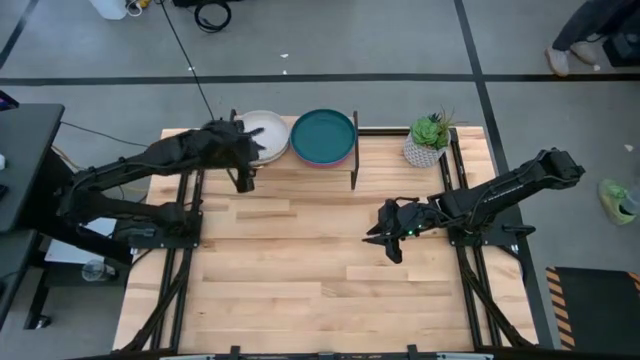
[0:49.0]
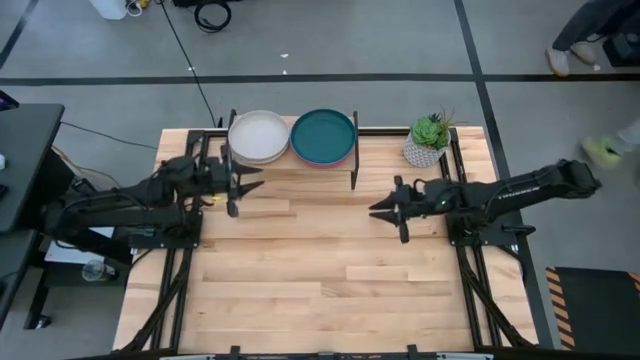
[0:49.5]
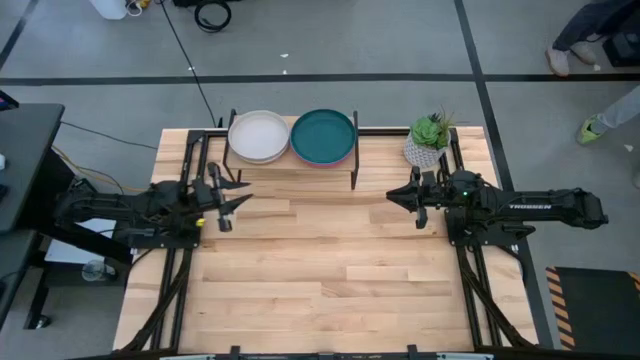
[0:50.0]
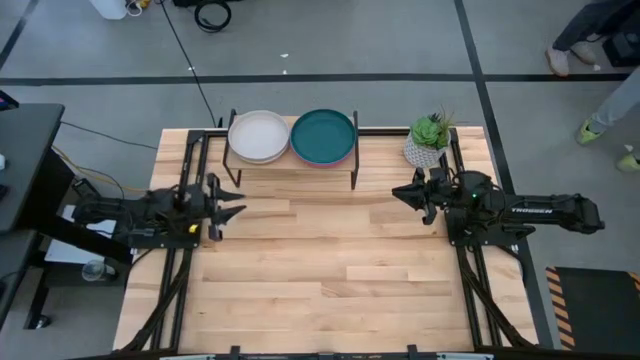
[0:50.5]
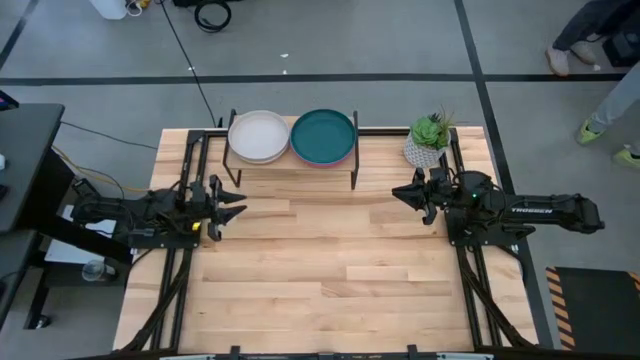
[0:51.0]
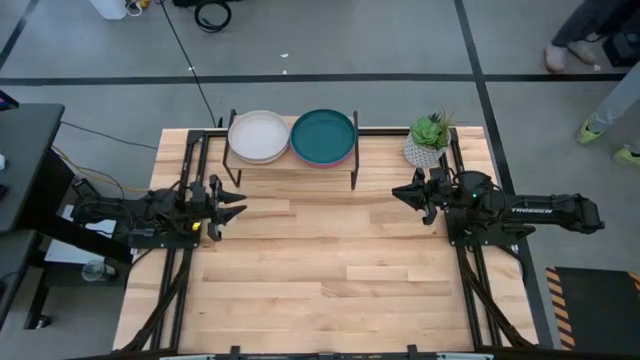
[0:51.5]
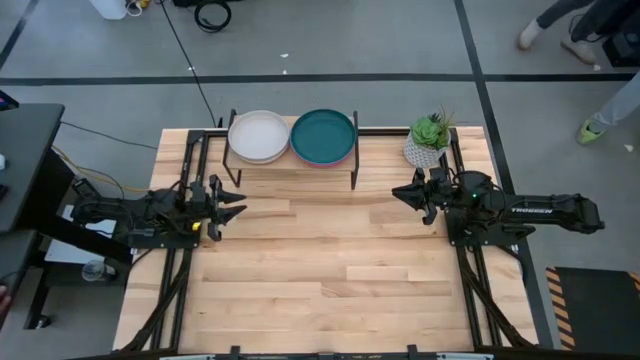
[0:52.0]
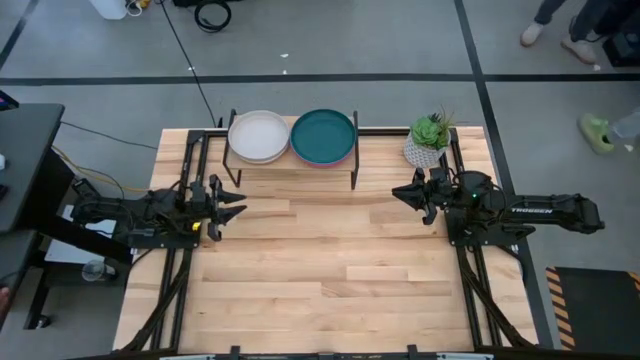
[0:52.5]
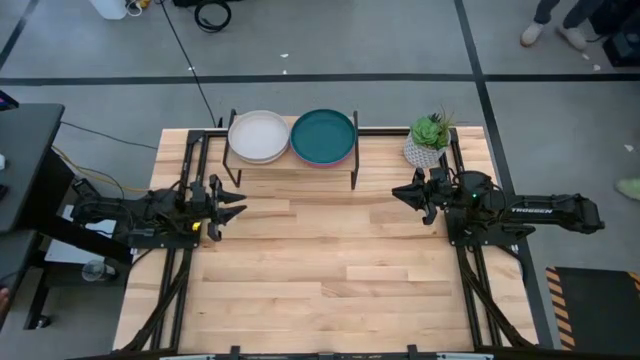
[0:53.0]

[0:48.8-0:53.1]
Task: Place and stack plates onto a shelf
Return to Home Position

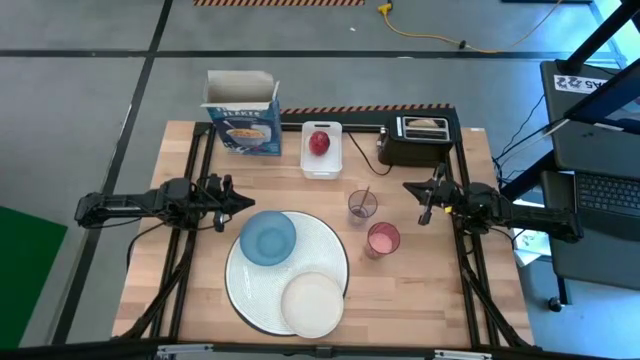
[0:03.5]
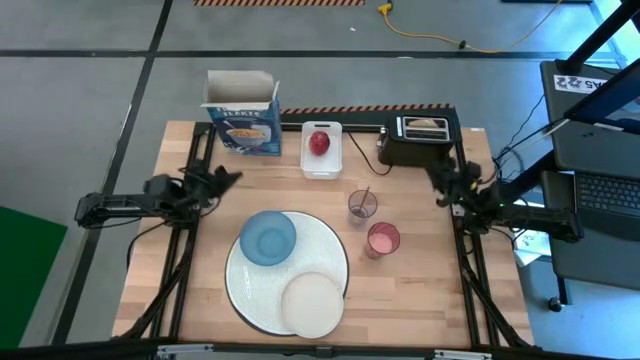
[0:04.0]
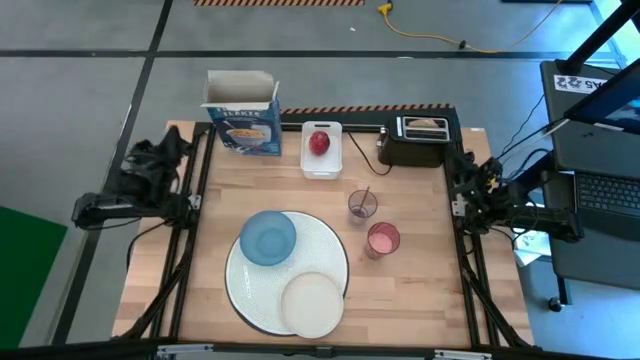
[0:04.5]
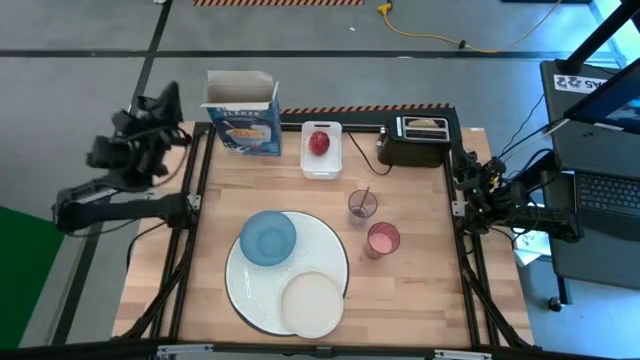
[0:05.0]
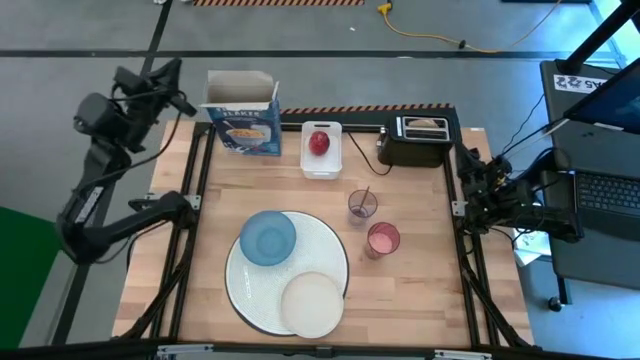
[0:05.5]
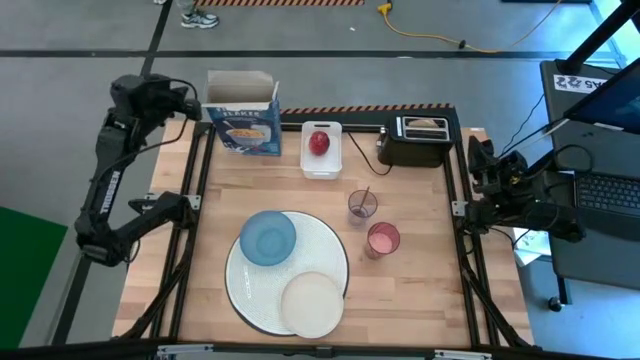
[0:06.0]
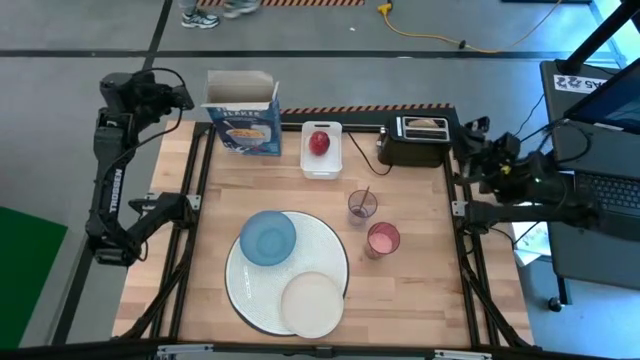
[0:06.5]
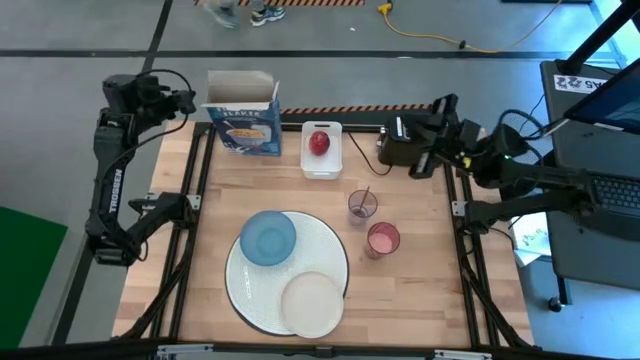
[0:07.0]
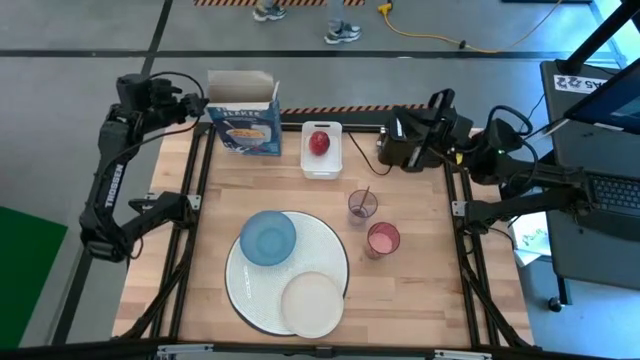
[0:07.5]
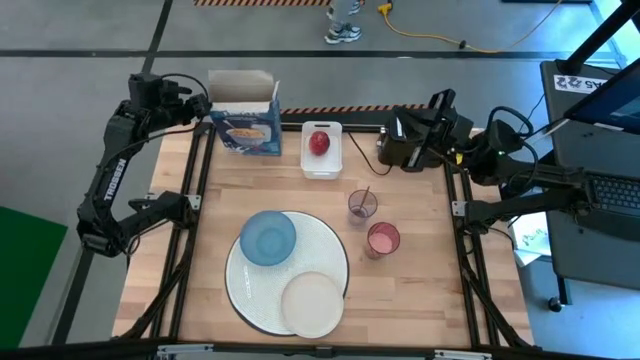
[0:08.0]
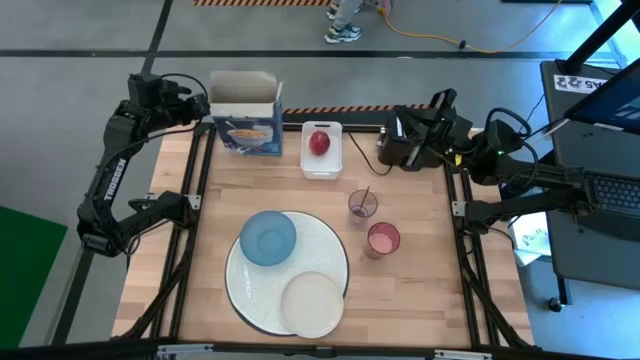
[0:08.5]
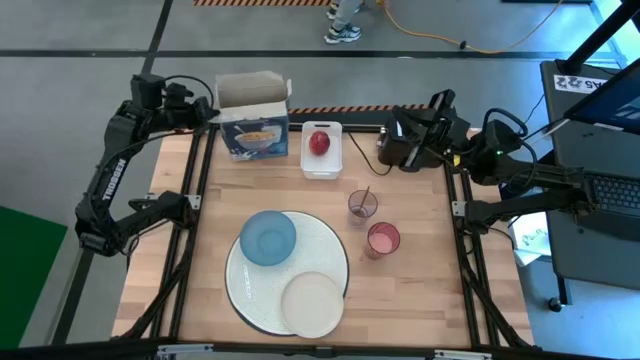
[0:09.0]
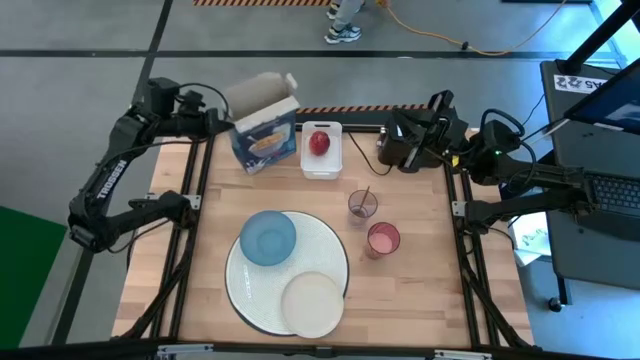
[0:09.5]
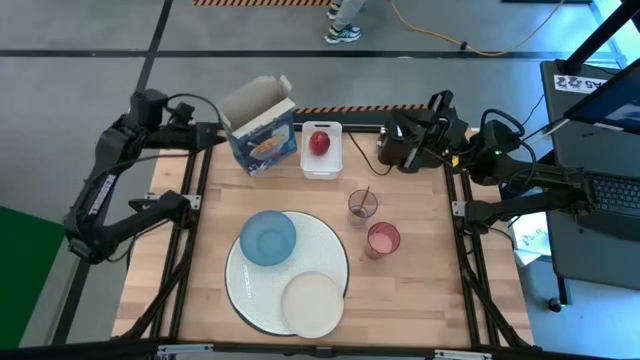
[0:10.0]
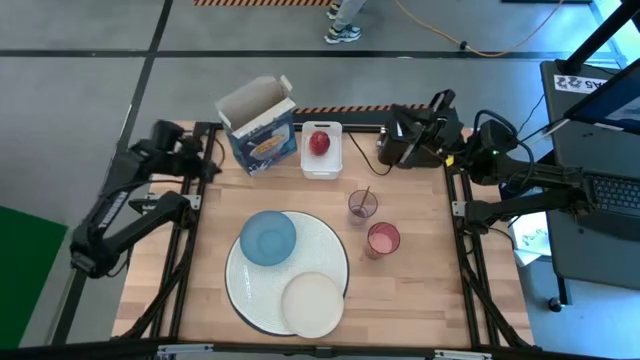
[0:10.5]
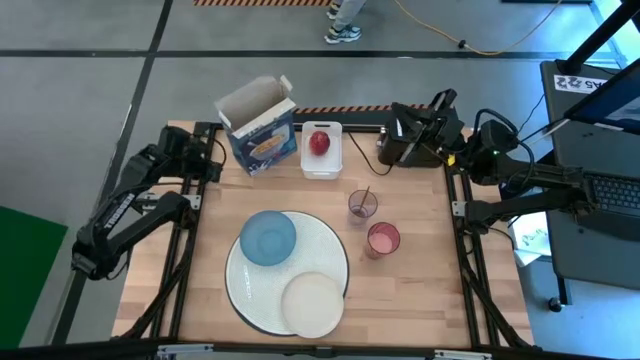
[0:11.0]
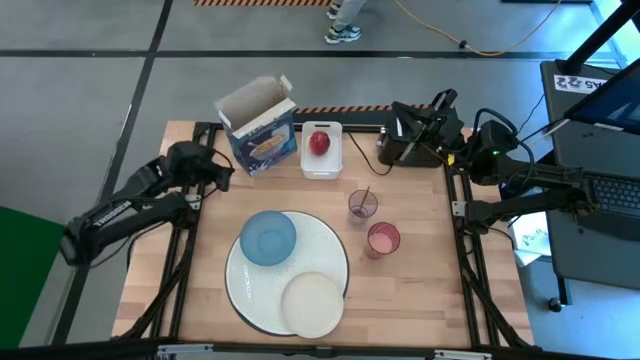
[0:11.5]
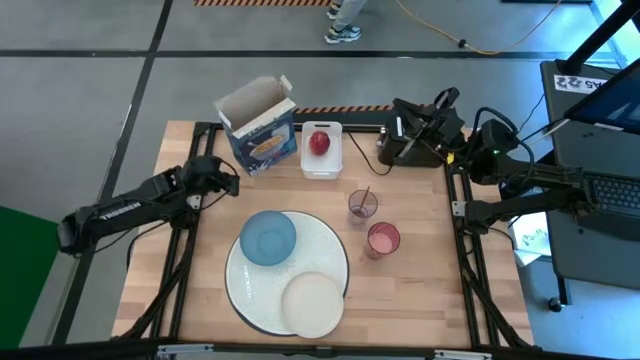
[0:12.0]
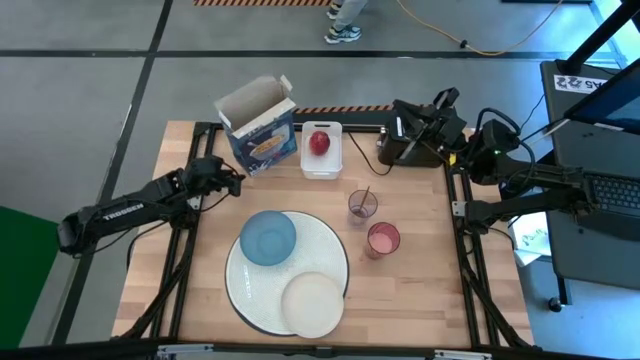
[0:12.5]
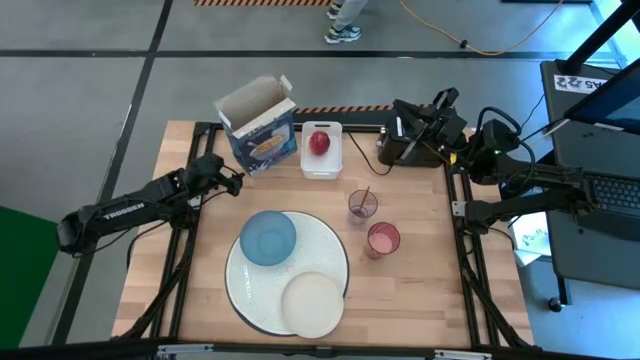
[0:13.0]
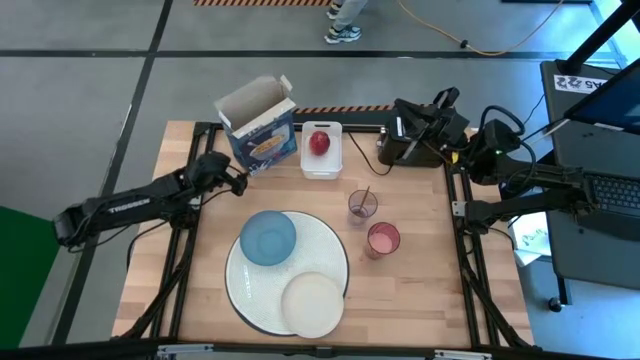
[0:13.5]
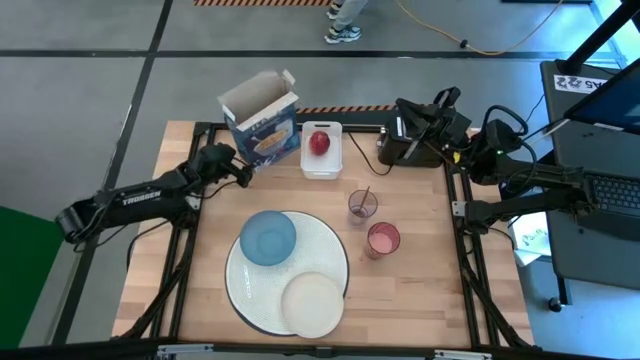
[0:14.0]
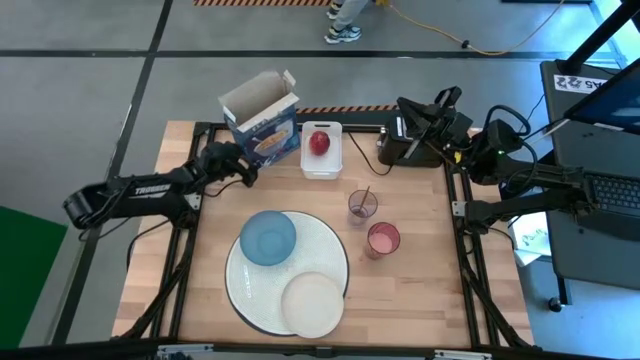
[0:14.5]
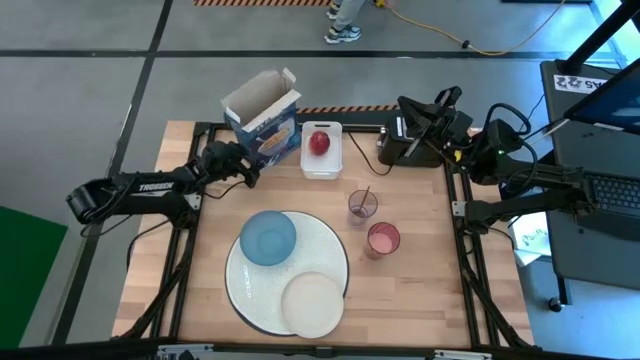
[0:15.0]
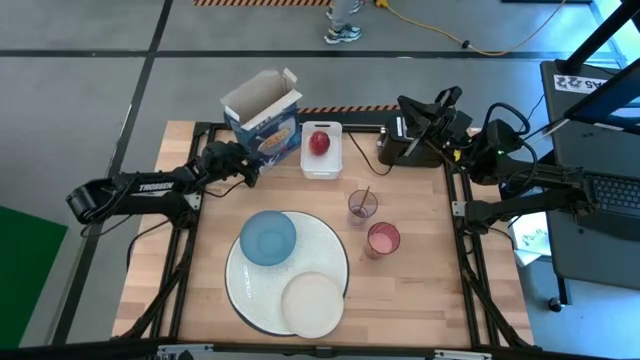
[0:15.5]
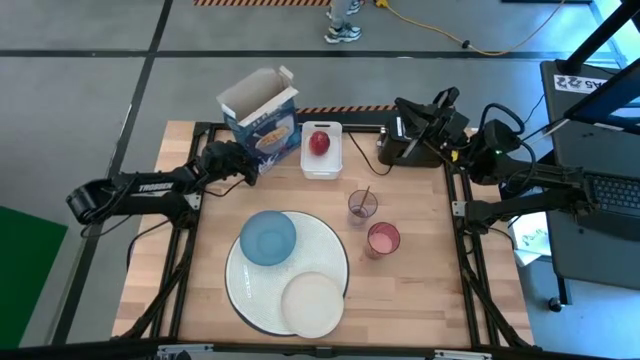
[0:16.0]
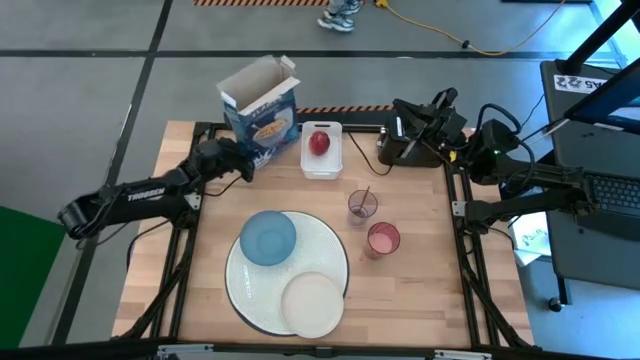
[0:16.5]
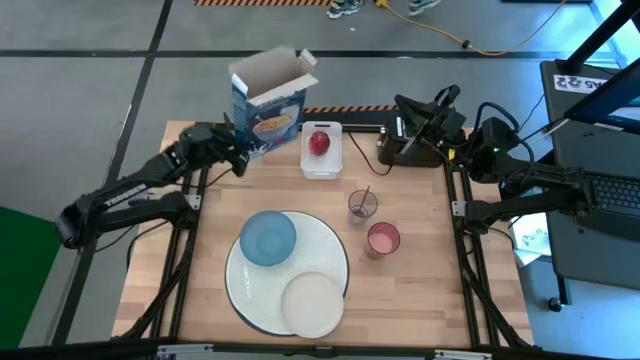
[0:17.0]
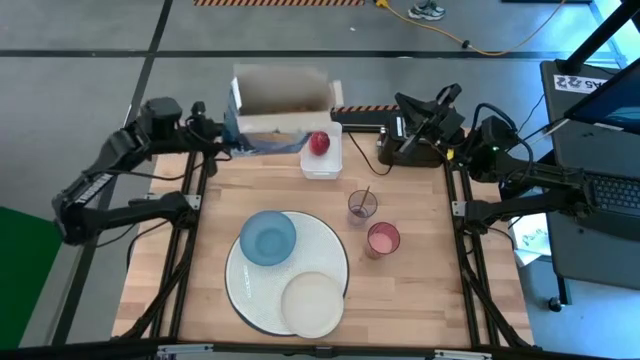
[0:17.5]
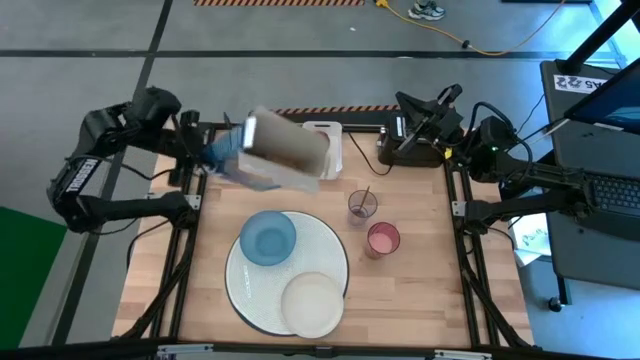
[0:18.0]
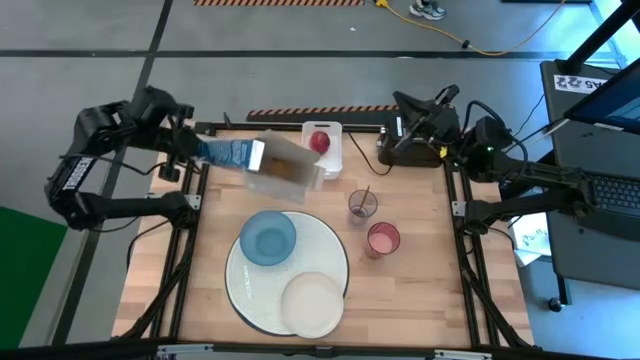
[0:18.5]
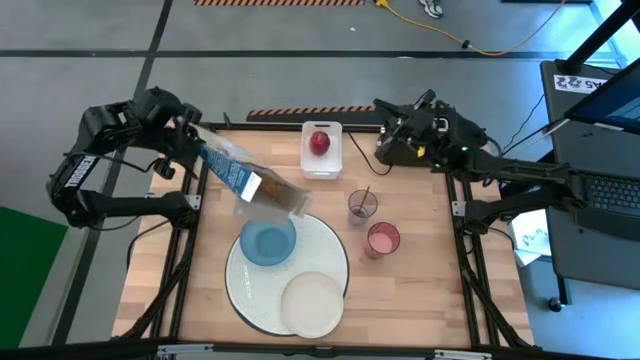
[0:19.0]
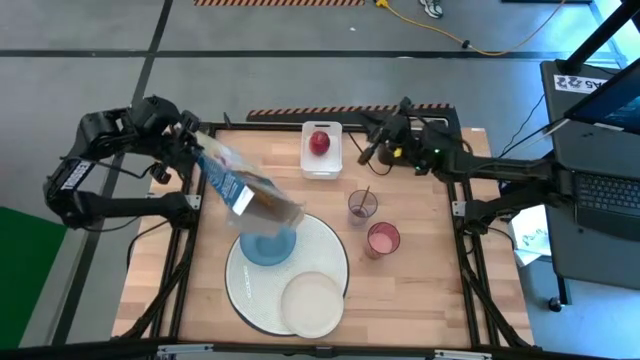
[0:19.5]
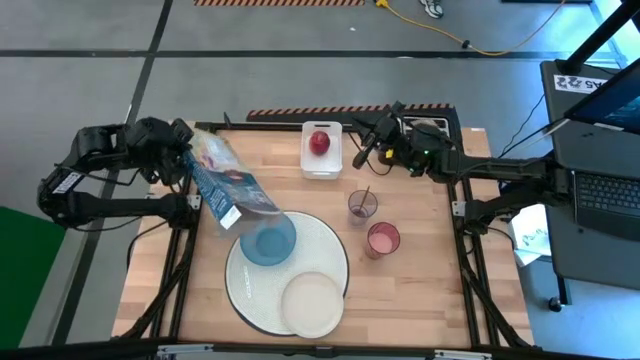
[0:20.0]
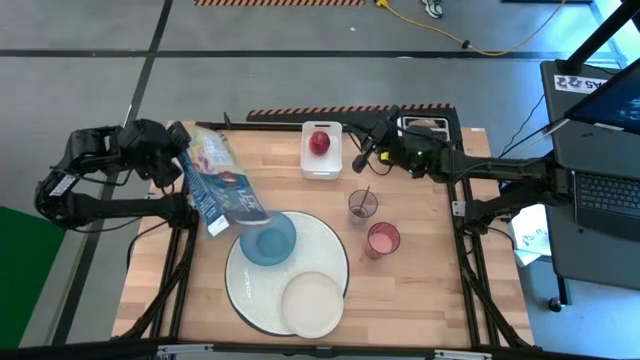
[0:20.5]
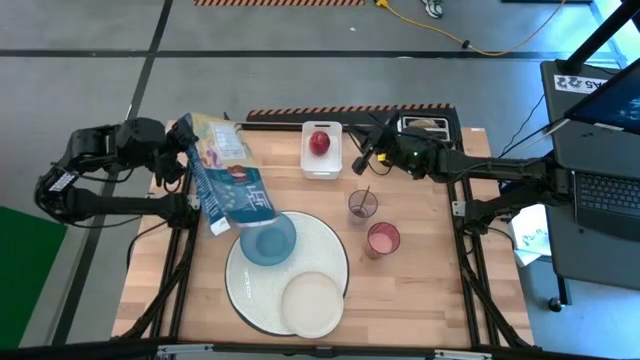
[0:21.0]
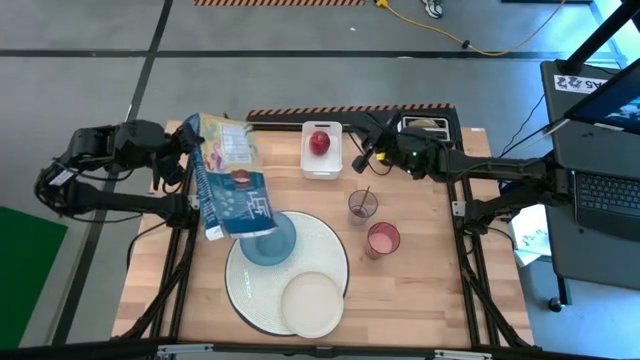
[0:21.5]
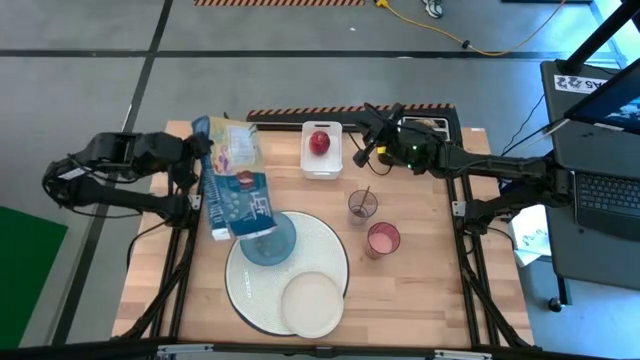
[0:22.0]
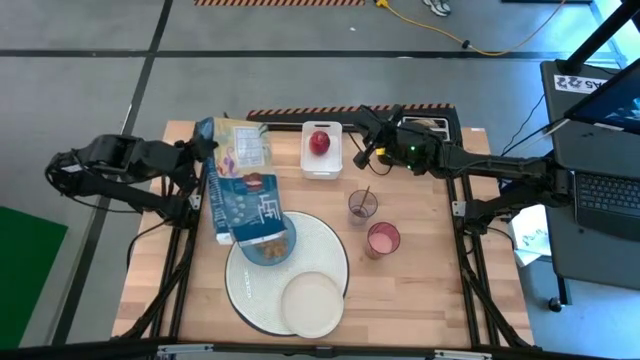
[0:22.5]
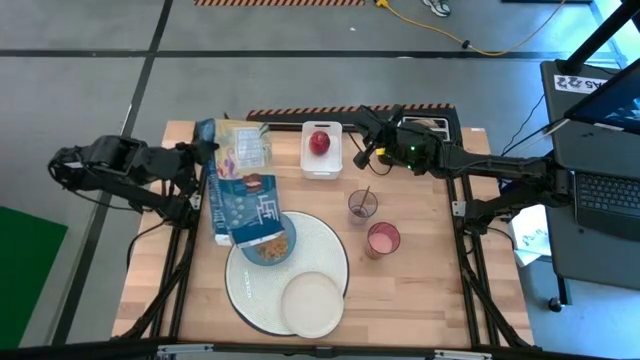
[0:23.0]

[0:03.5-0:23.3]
Task: Arrange a breakfast setting
Pour the cereal into the blue bowl
